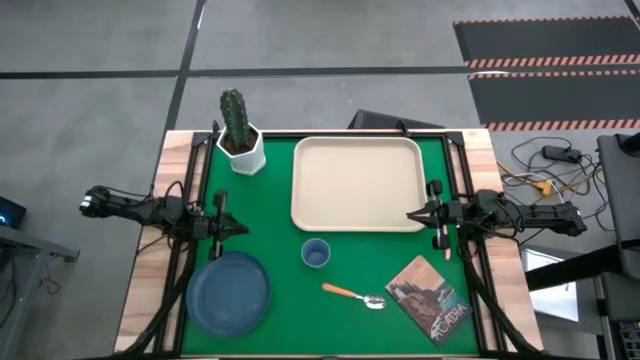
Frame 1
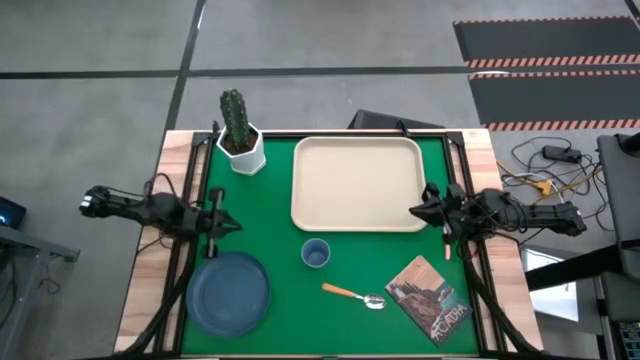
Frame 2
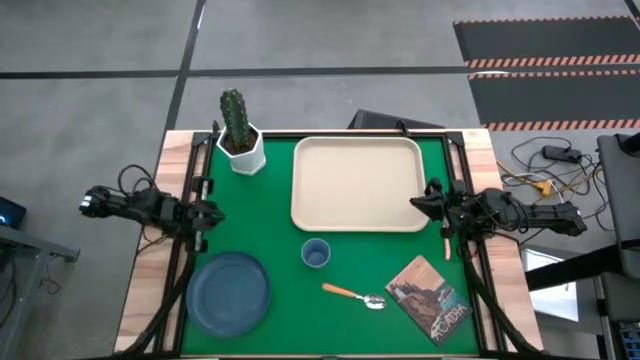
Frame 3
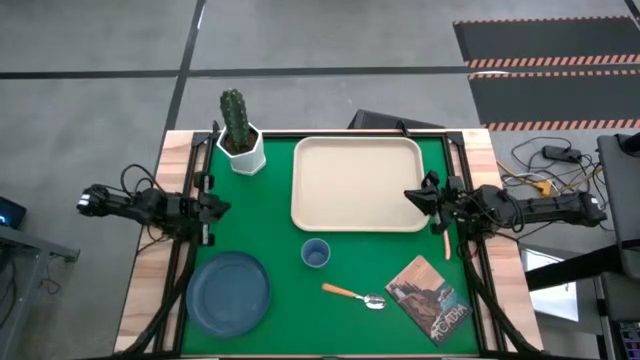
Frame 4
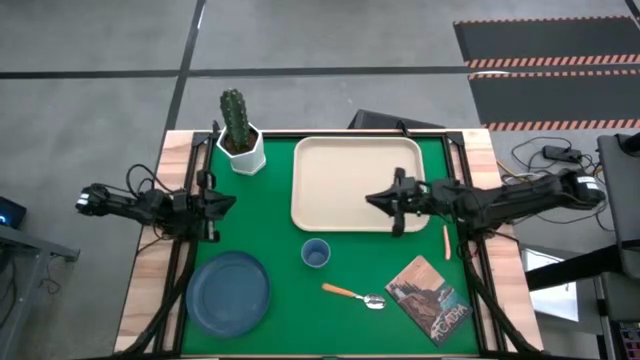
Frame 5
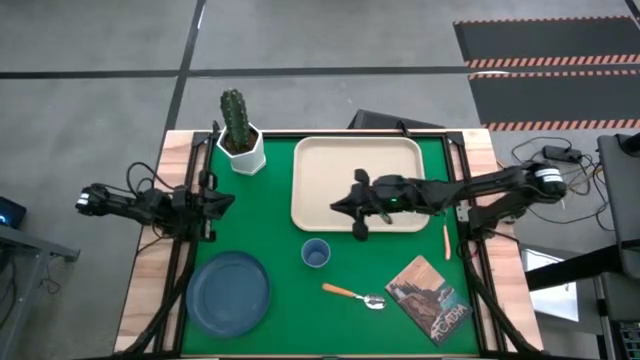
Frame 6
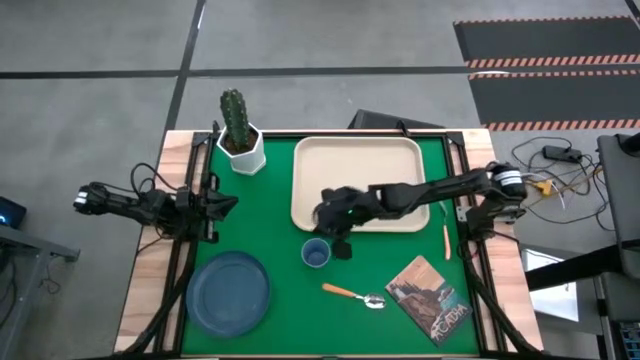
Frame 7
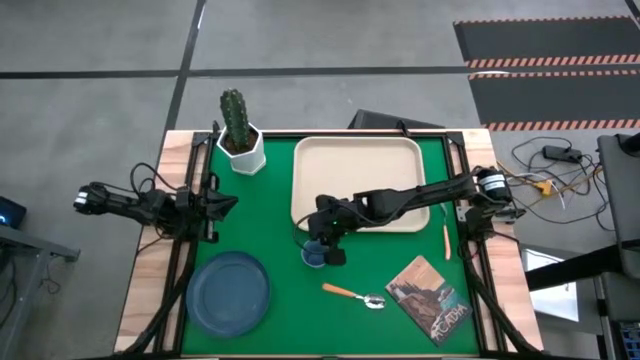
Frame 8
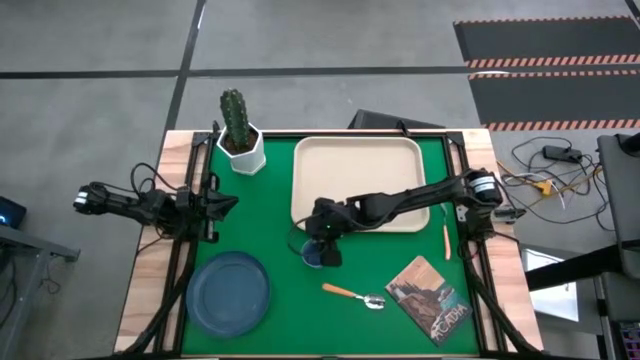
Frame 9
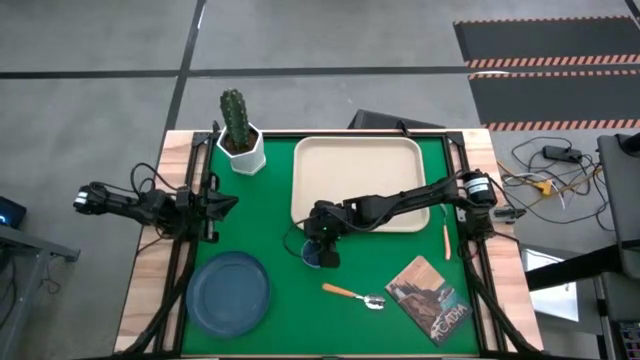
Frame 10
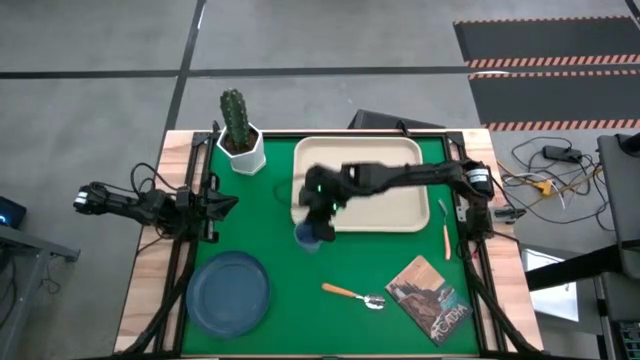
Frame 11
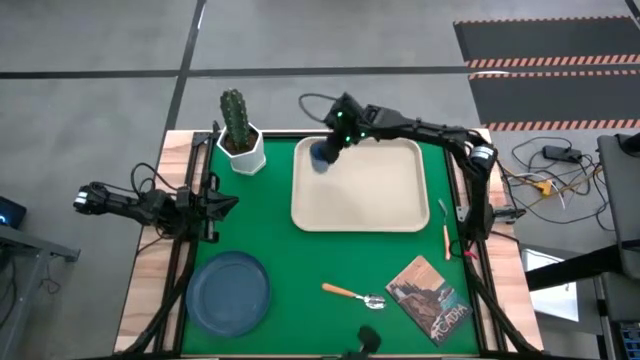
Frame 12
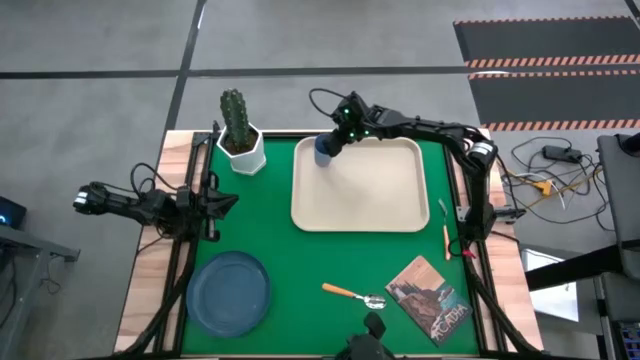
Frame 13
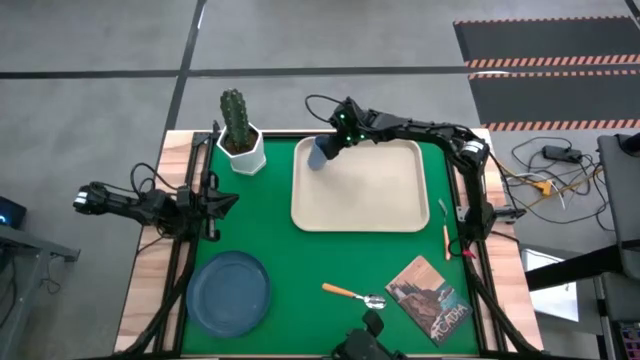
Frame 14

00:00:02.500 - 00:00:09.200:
Task: Pick and place plate/cup/fork/spoon on tray
Put the blue cup on the white serving tray

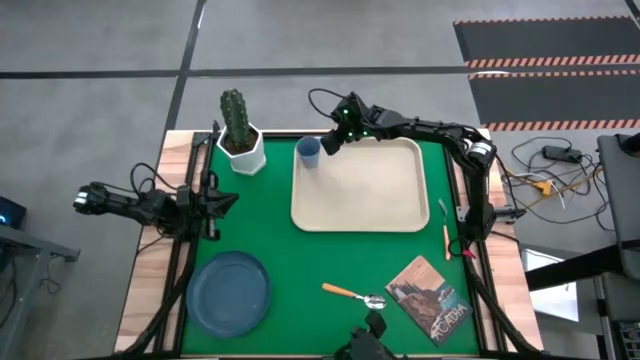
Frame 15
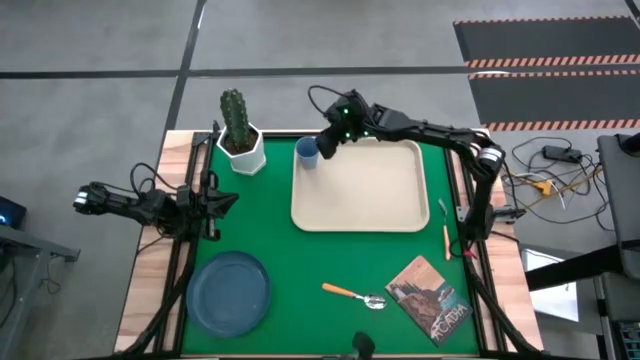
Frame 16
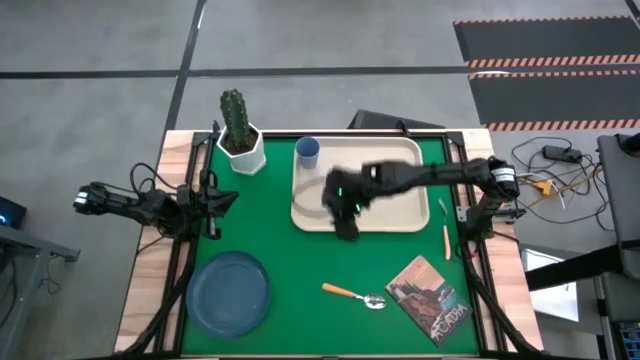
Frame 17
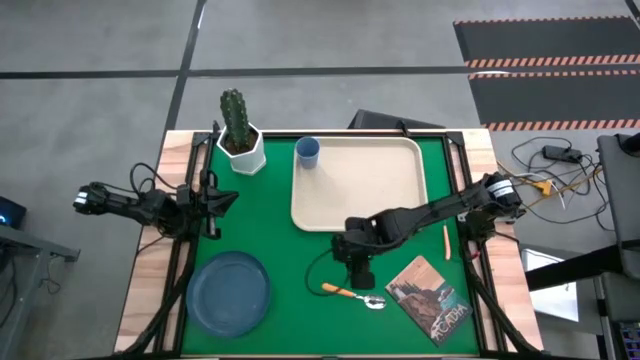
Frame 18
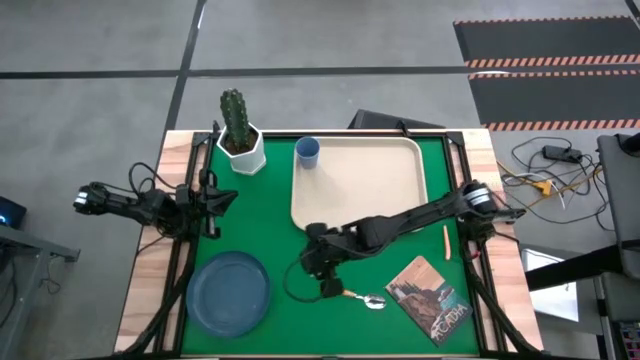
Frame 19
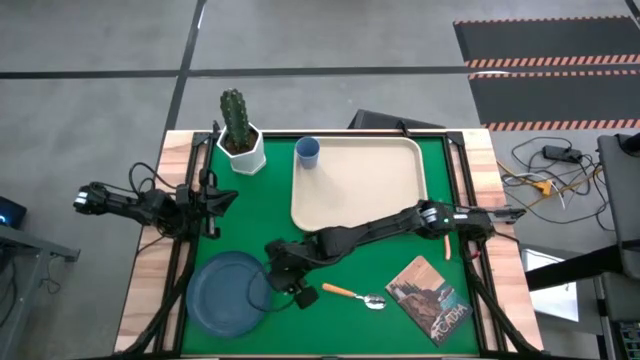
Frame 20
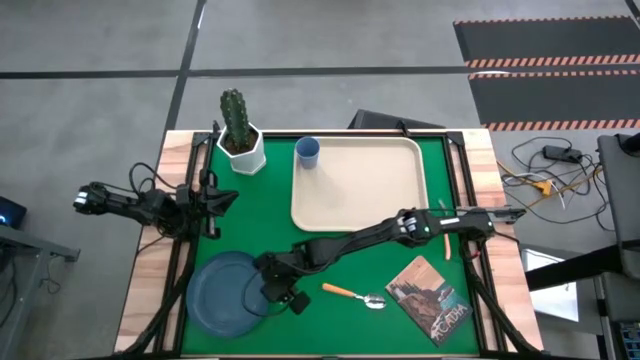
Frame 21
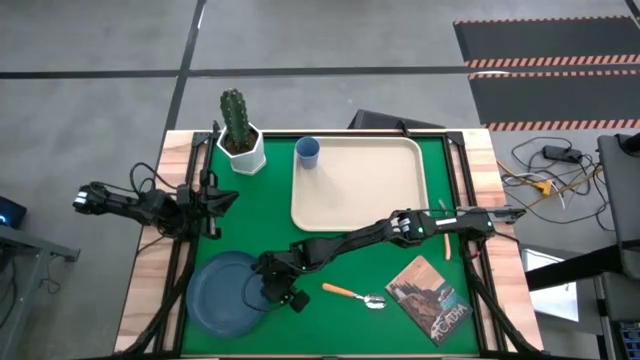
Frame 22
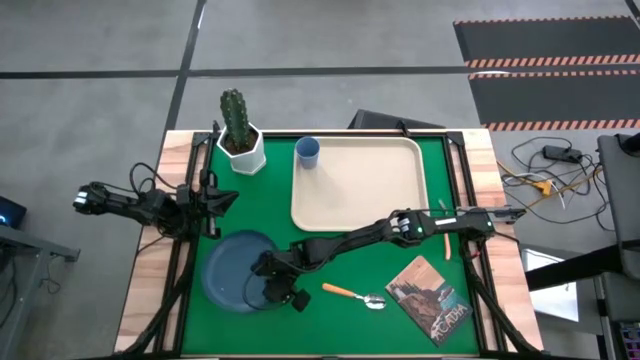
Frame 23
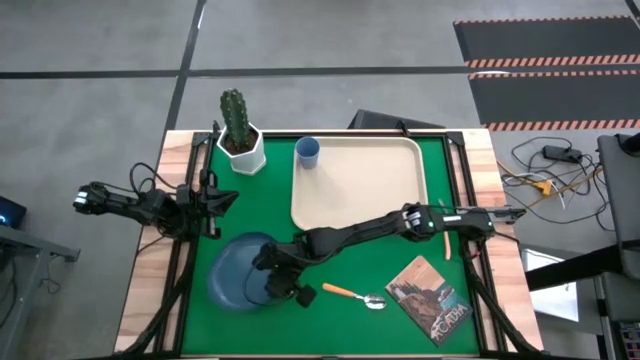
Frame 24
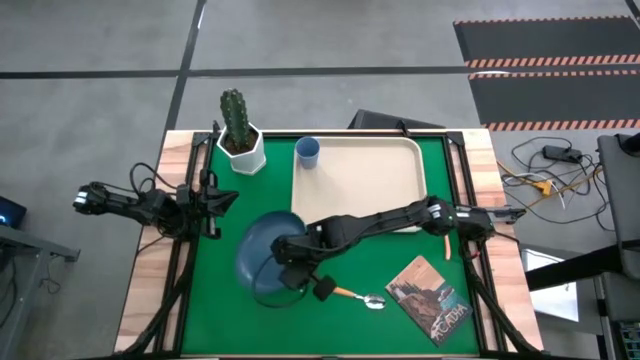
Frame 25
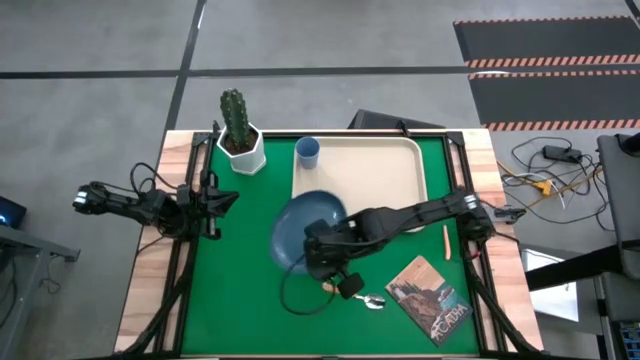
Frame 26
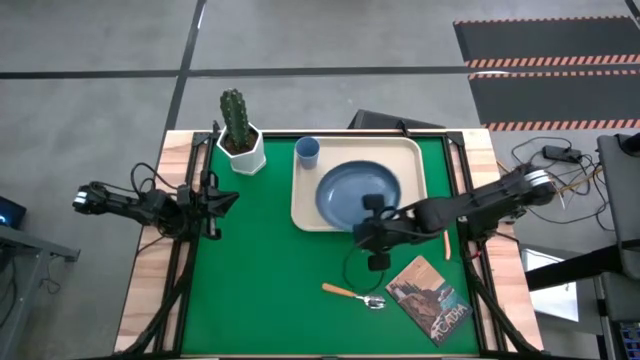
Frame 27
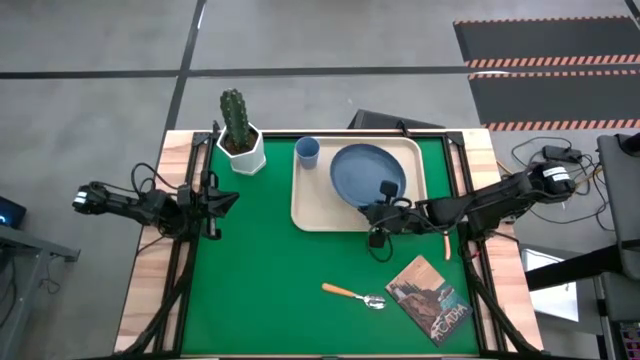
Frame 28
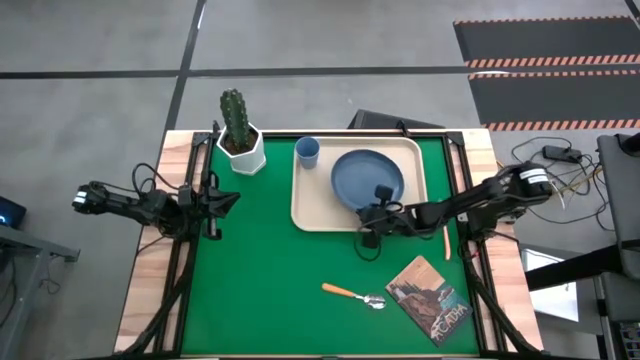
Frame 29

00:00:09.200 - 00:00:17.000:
Put the blue plate on the white serving tray to the right side of the blue cup

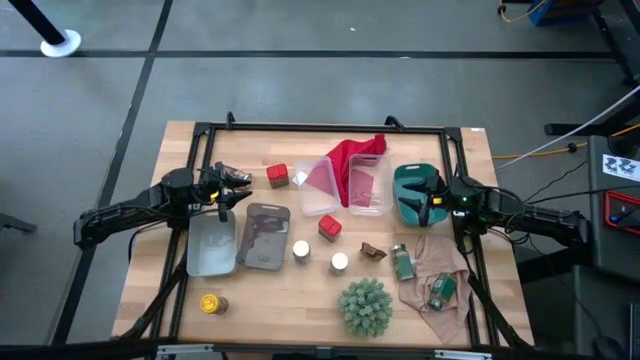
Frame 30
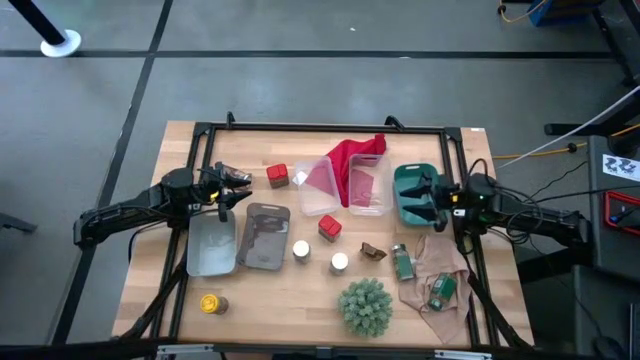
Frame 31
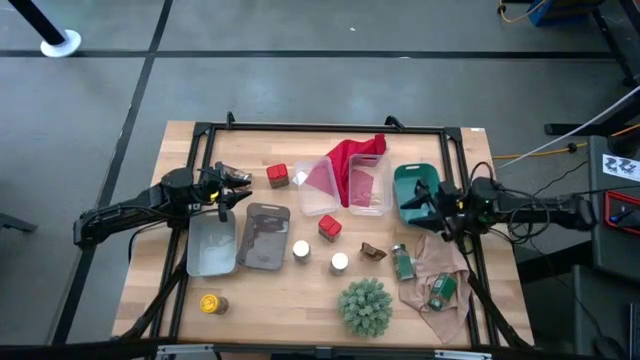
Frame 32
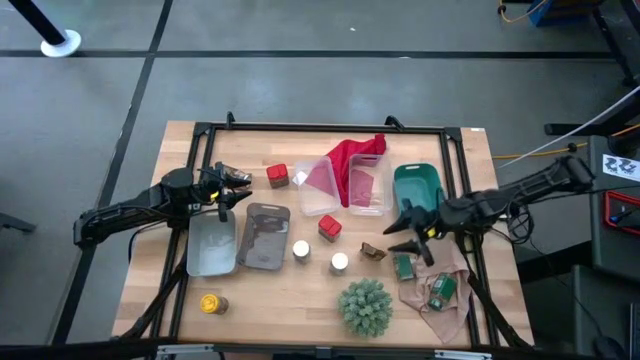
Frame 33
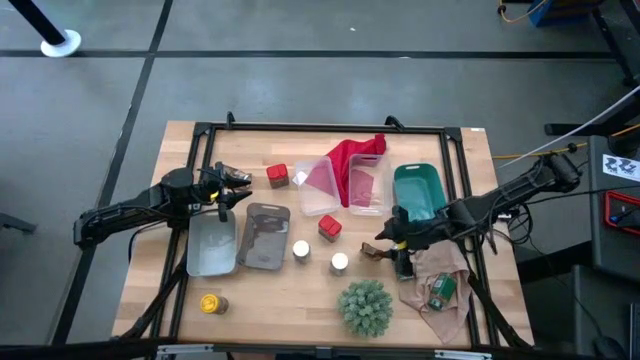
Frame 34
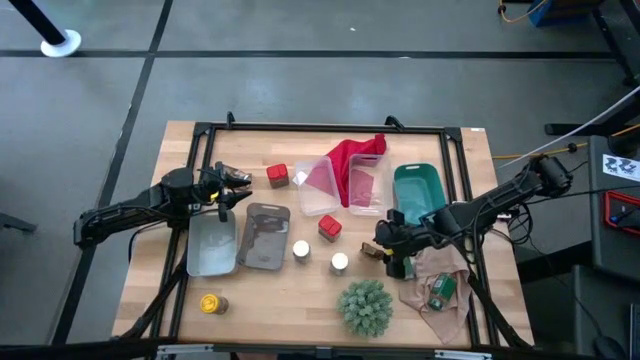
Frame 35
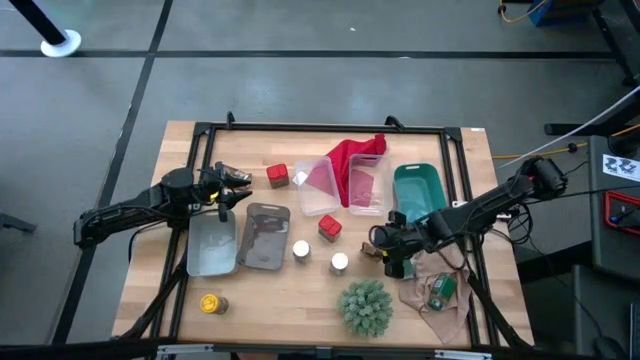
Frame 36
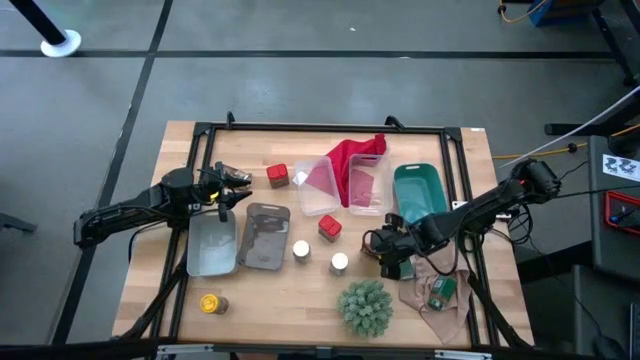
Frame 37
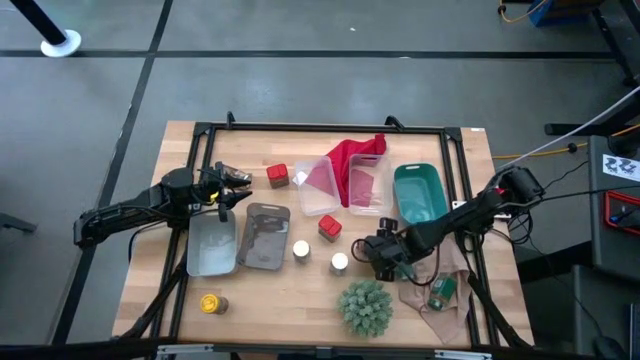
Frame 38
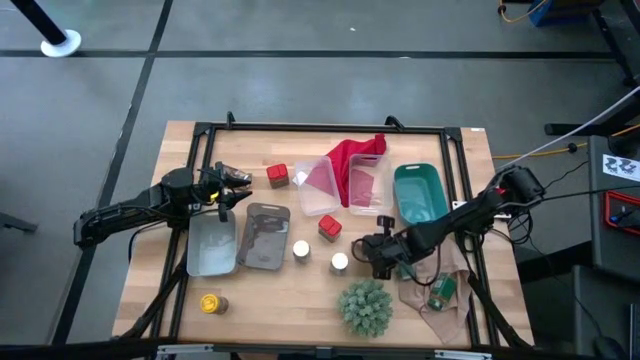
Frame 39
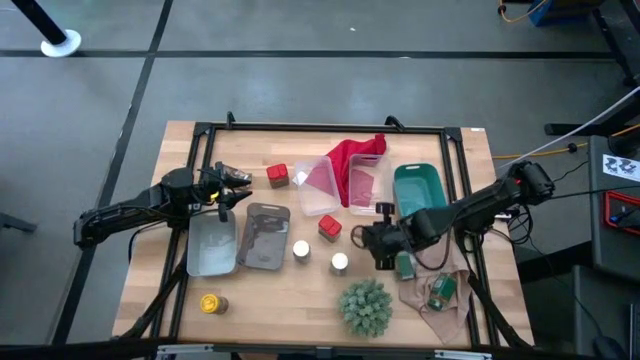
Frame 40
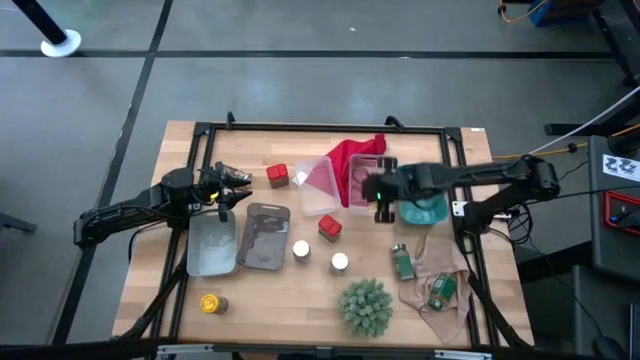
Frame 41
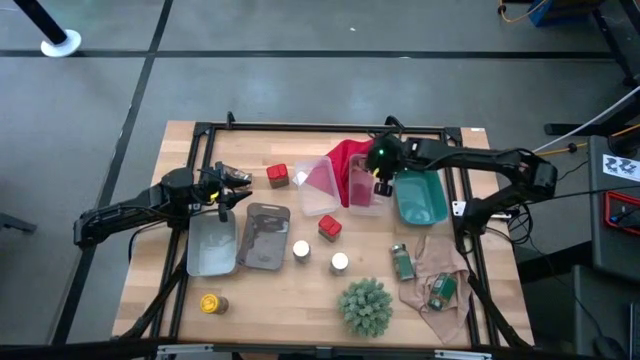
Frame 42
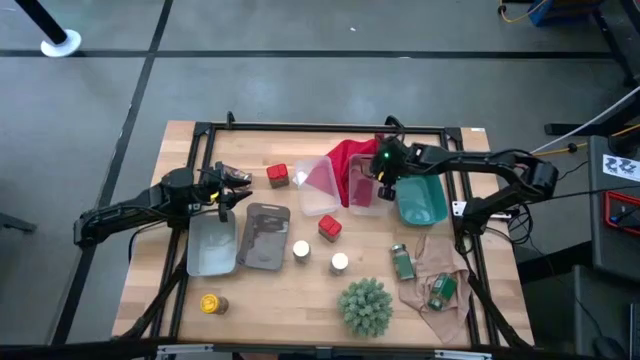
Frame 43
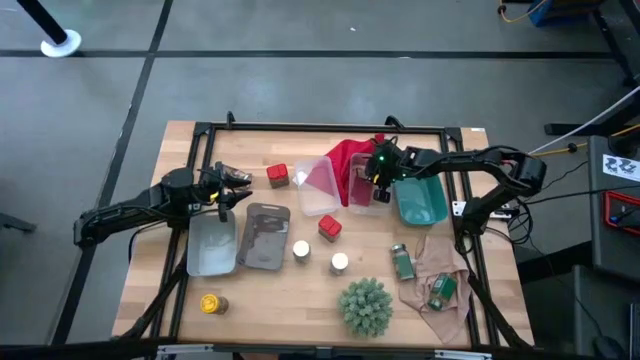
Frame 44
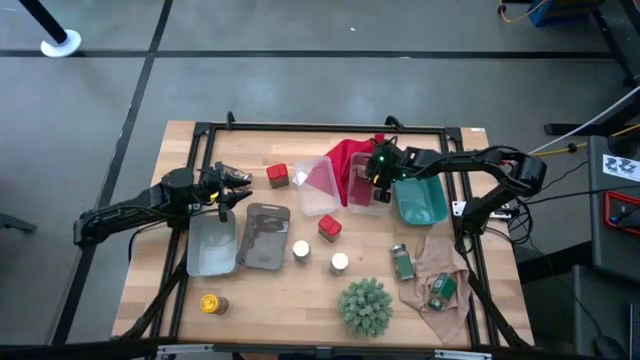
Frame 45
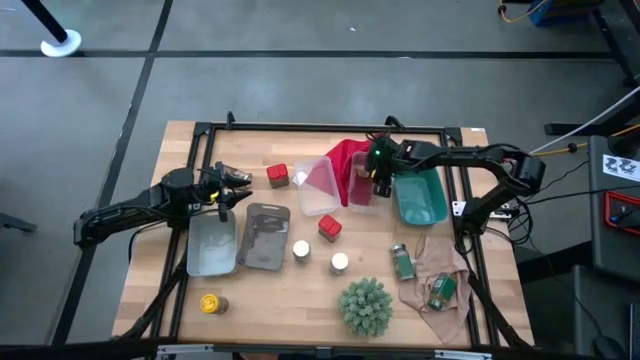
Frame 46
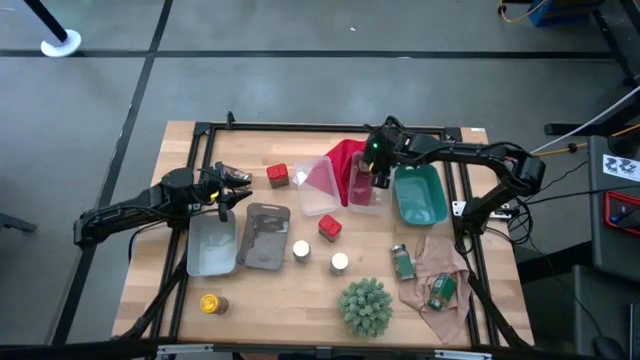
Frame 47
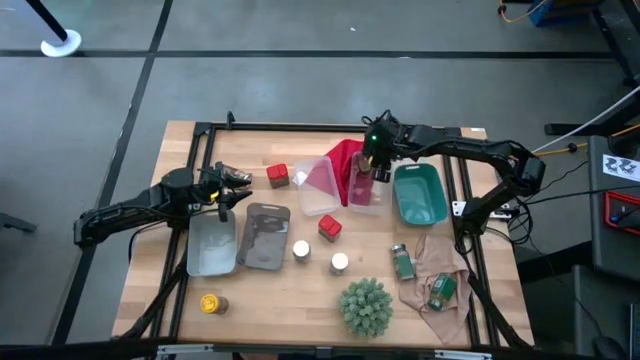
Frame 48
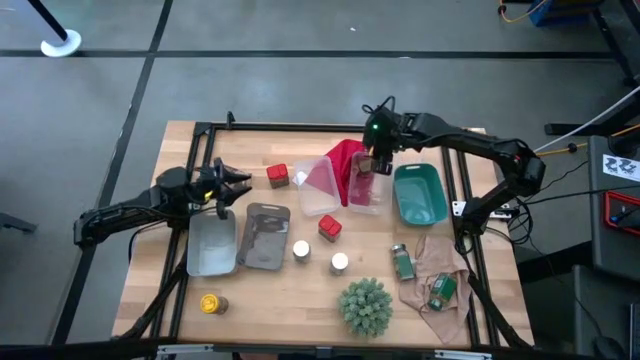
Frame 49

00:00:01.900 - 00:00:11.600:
Task: Sort spices by type
Put the right orange seasoning pack into the right transparent bin
